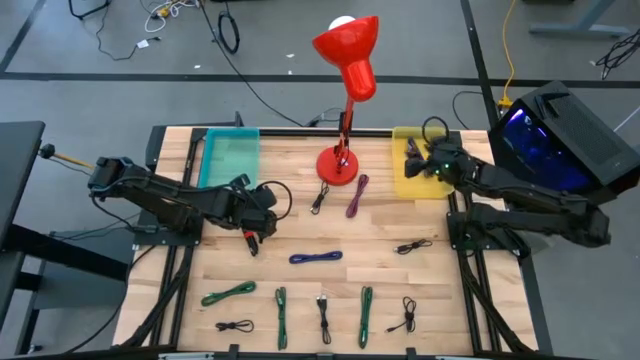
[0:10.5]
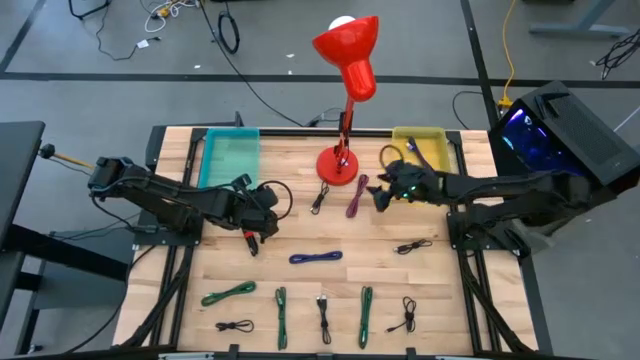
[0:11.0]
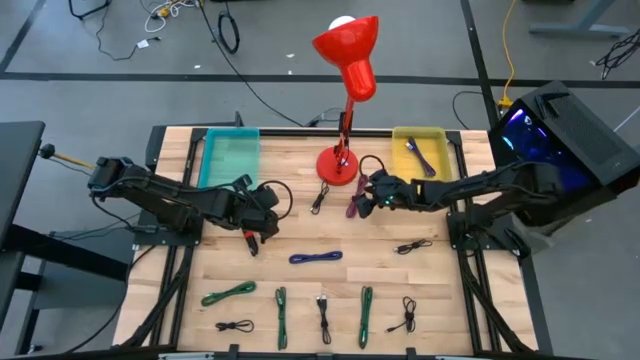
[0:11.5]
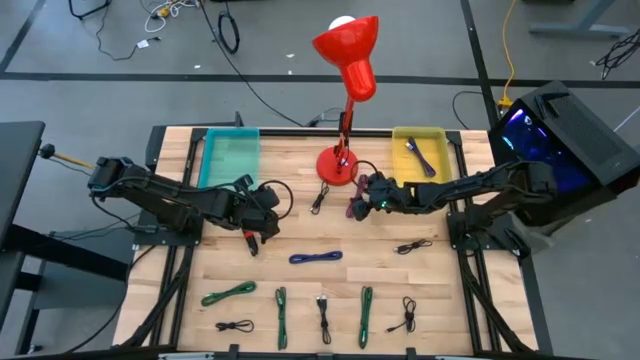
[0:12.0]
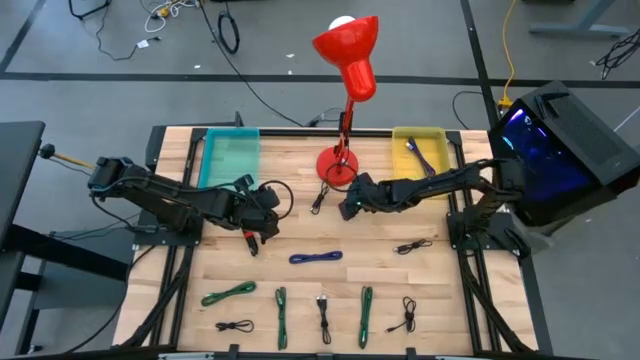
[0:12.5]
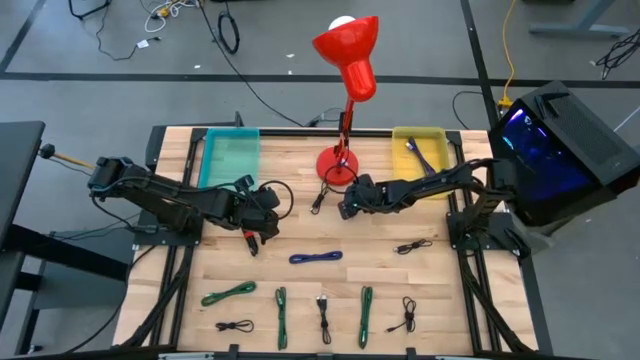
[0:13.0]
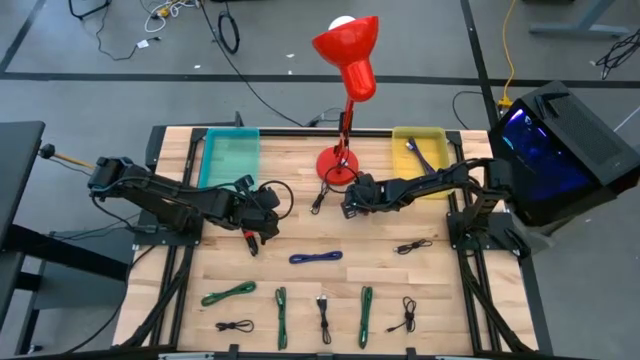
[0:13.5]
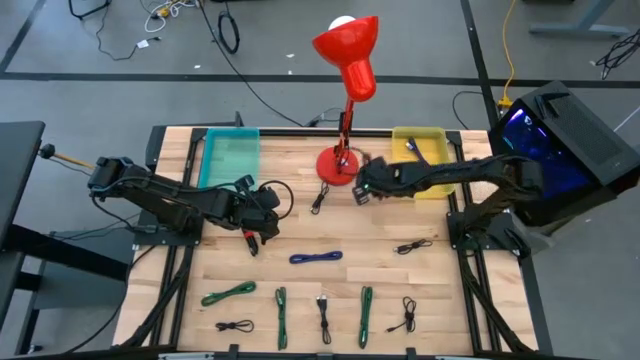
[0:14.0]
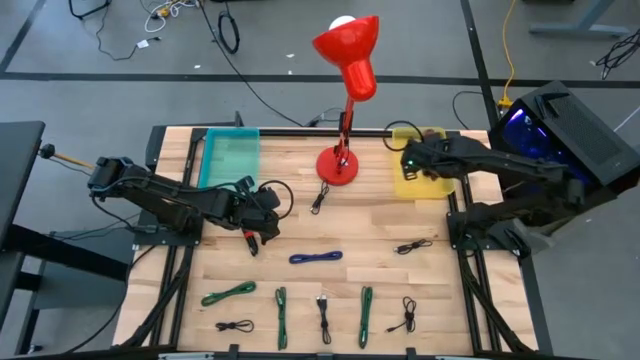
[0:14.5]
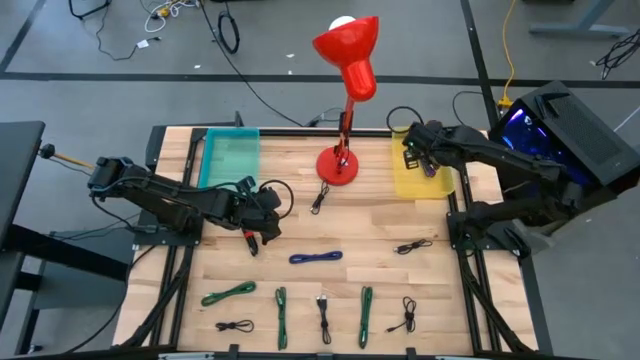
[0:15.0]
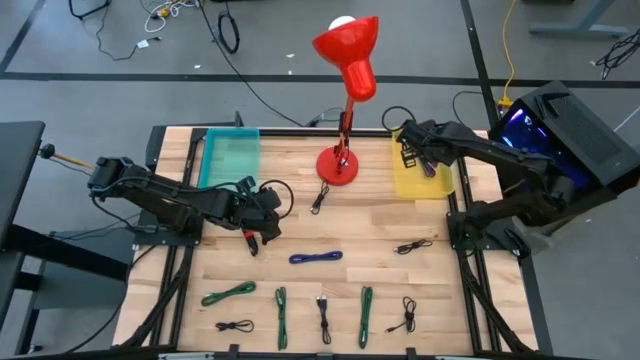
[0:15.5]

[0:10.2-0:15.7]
Task: Pick & Place USB Port
Put the pink black USB cable into the yellow bin

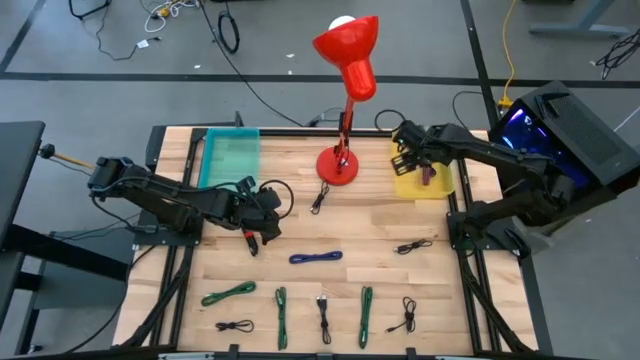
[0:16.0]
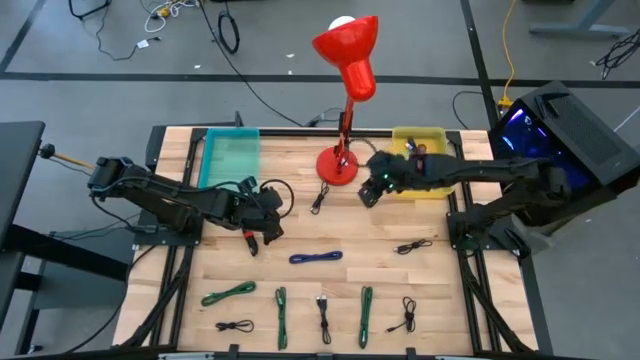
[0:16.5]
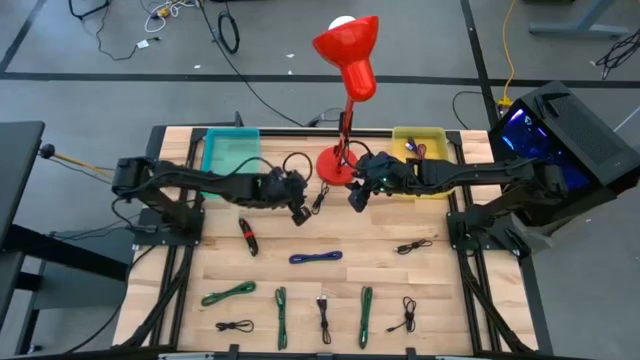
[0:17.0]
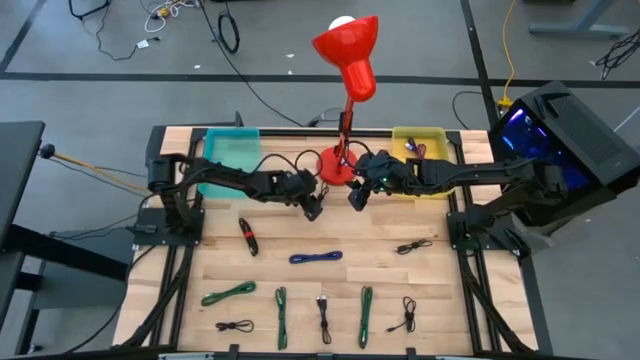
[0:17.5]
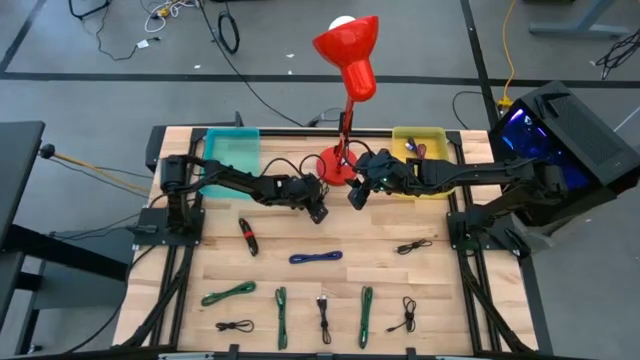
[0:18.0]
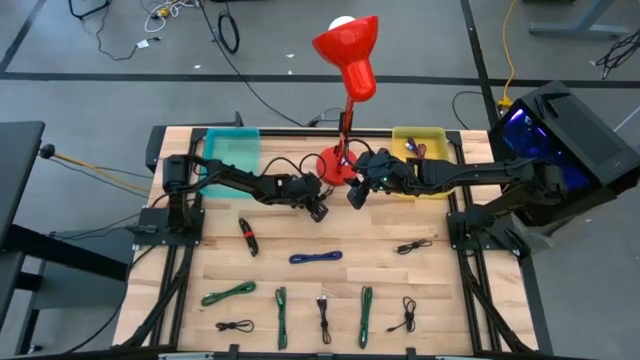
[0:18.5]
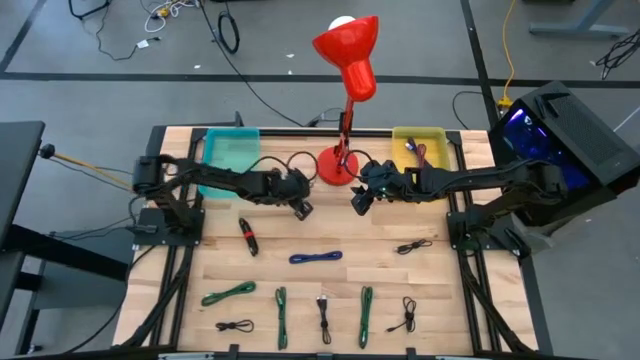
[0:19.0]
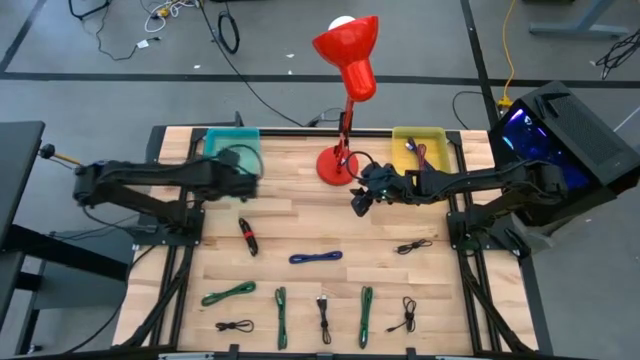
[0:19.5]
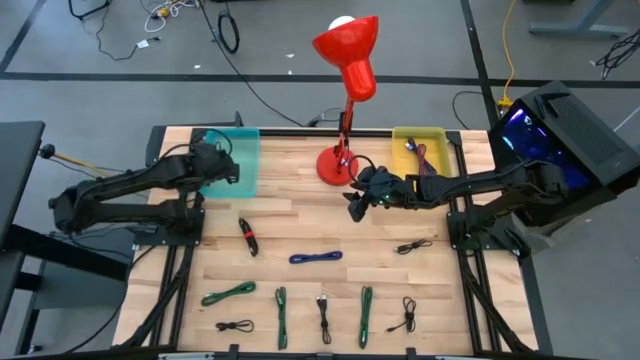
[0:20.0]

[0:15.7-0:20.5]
Put the black USB cable into the green bin

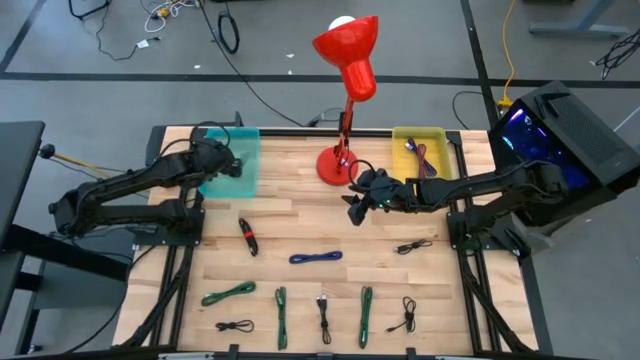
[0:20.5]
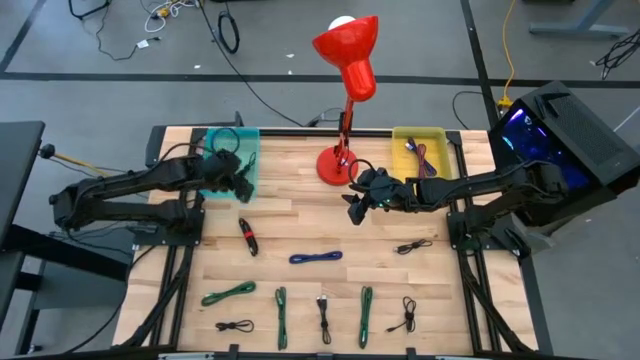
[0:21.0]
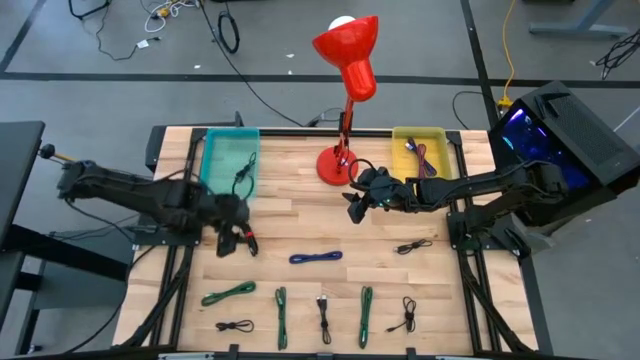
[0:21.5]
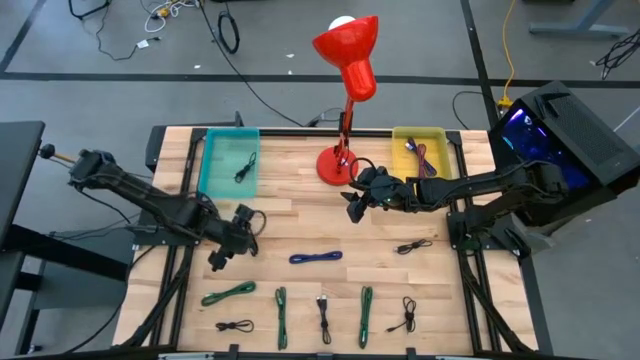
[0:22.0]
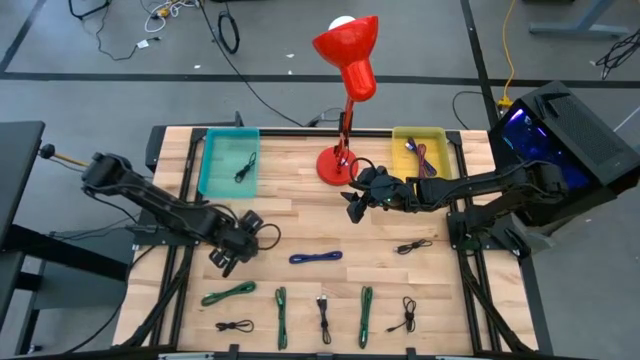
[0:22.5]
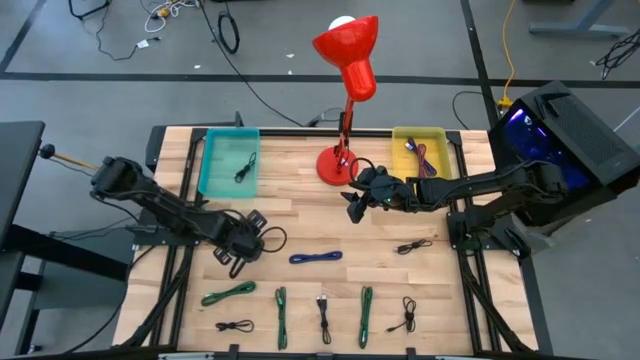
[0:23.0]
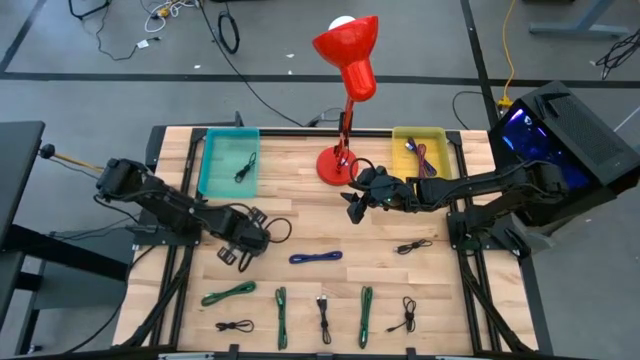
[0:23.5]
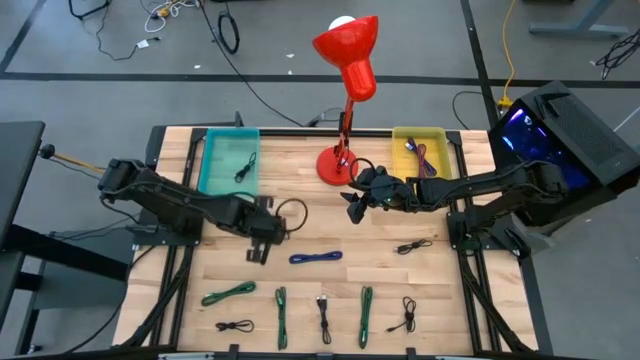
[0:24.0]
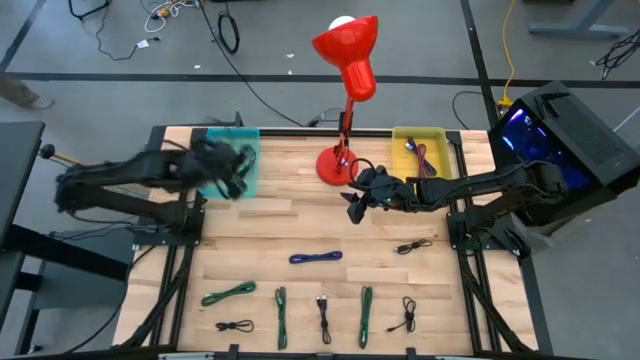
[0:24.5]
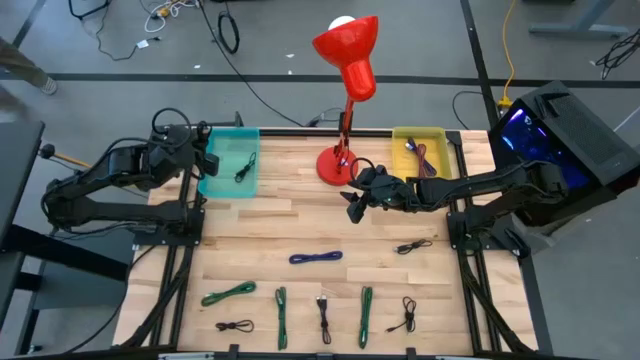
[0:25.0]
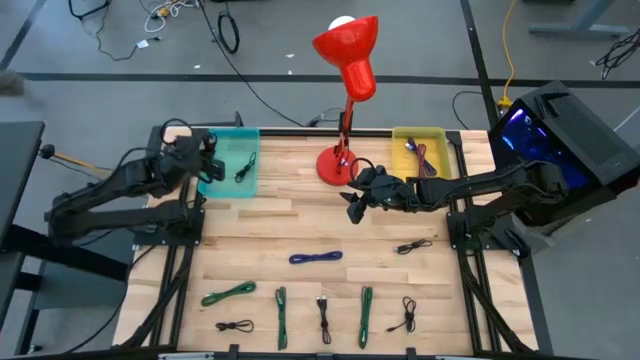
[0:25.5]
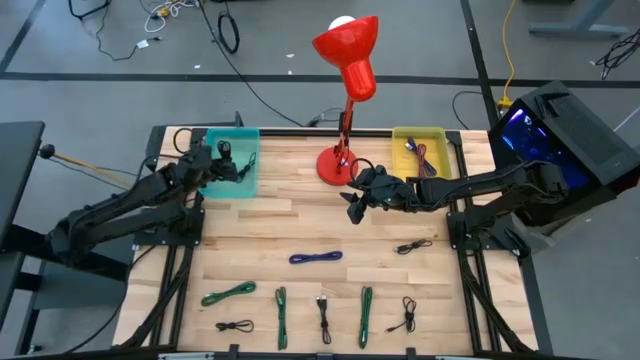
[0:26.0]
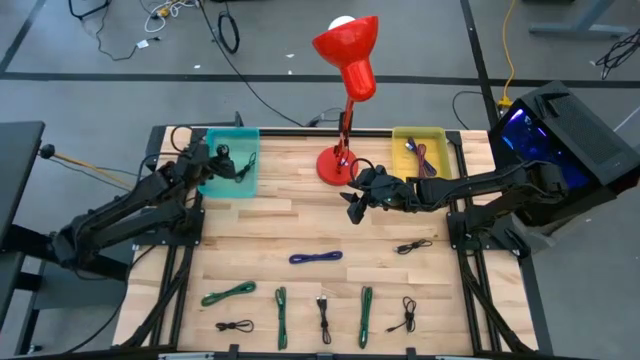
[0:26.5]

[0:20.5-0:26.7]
Put the black USB cable into the green bin

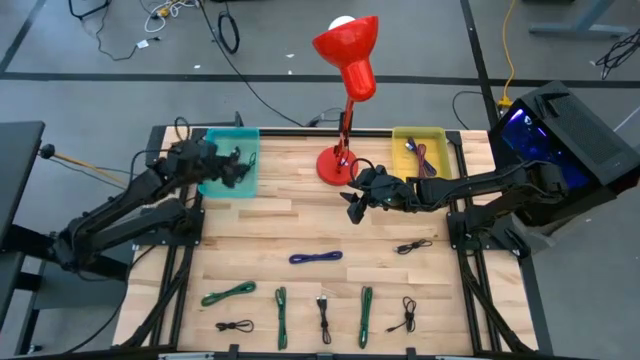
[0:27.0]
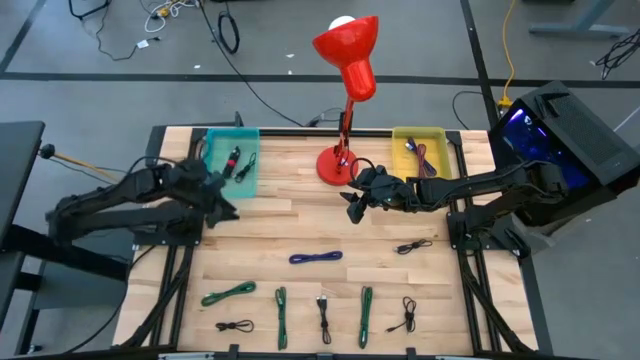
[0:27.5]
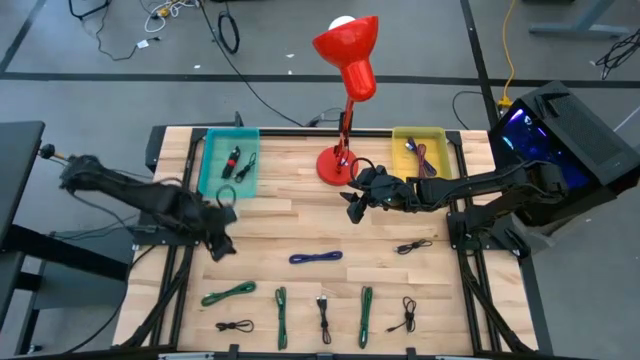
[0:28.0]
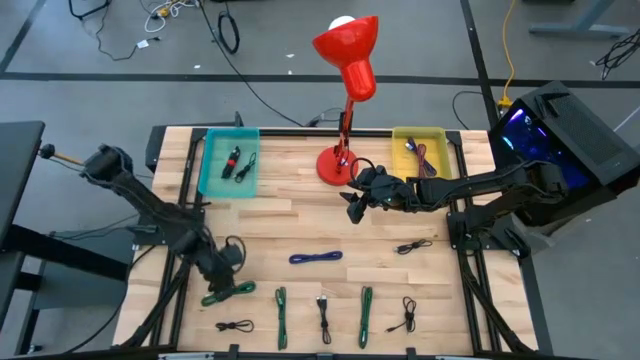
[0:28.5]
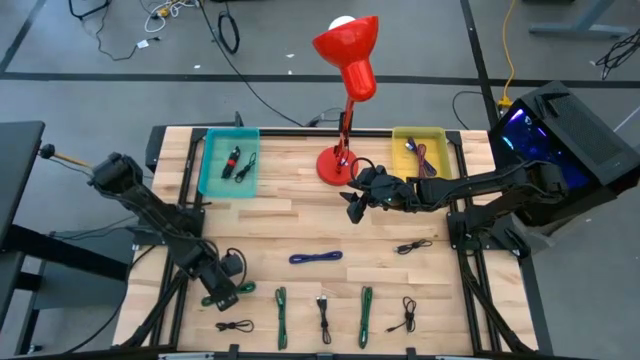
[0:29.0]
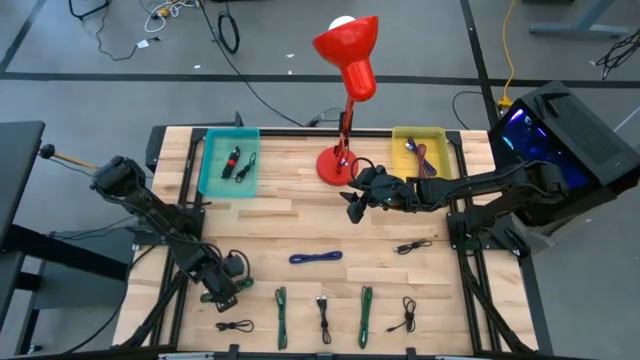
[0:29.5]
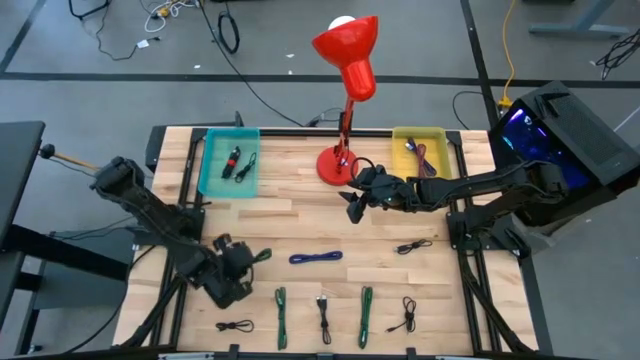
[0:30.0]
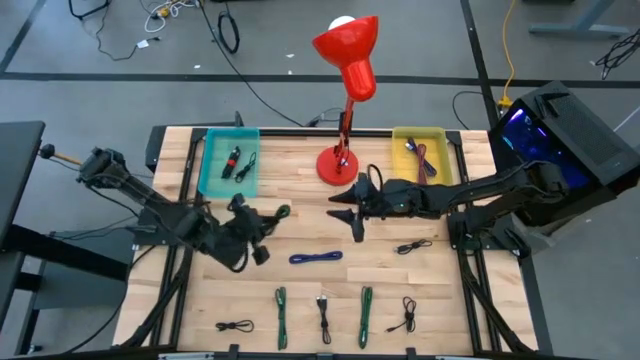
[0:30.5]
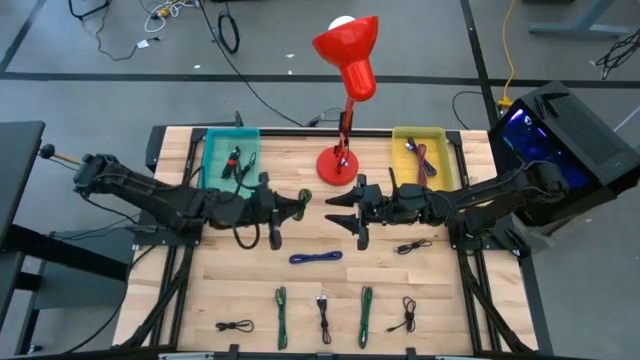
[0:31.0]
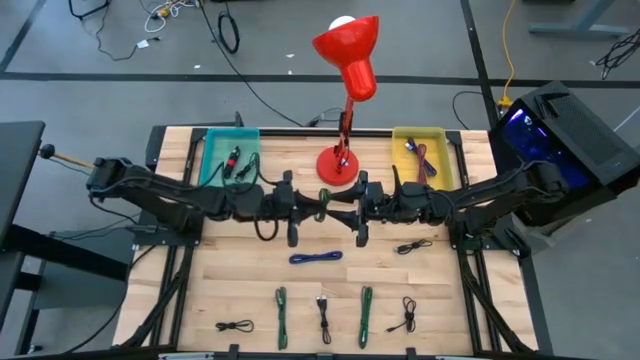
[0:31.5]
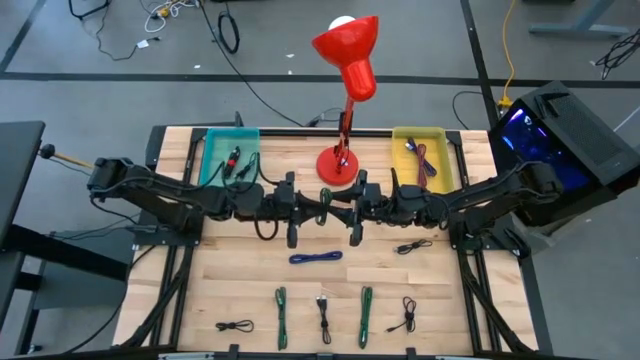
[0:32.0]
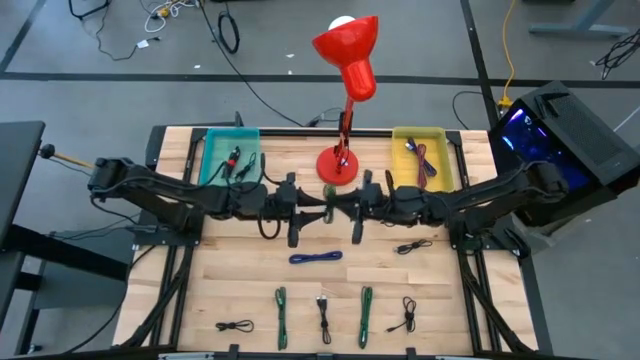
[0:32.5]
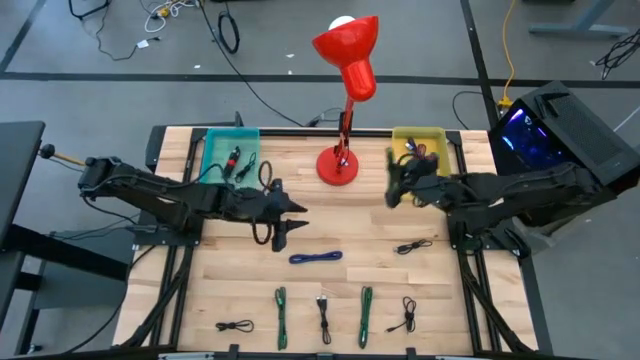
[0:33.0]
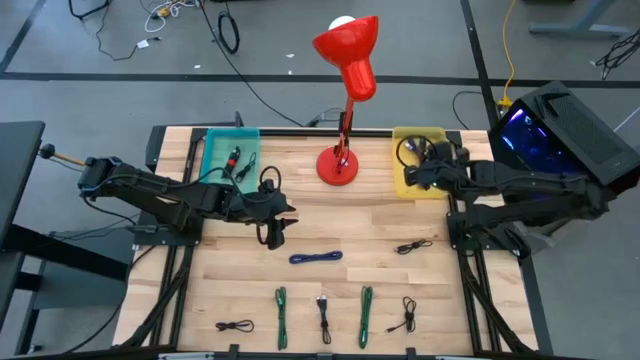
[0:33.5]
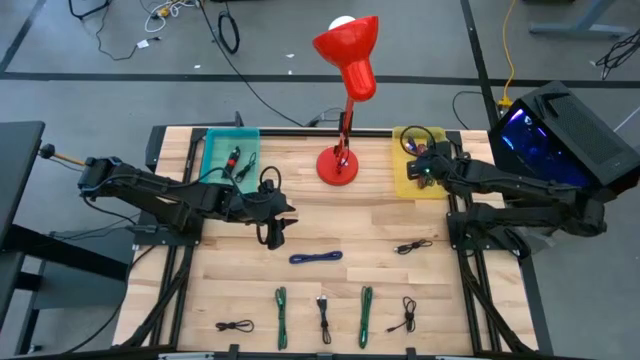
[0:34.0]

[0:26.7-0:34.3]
Put the green black USB cable into the yellow bin
